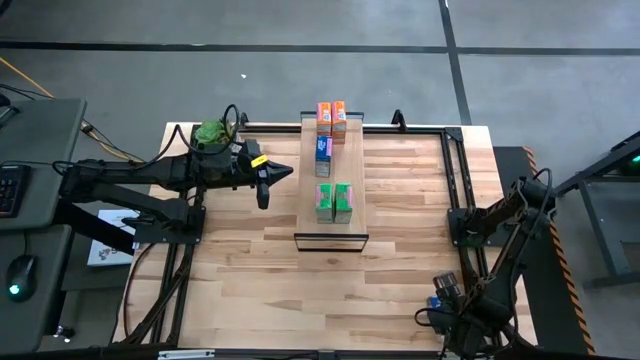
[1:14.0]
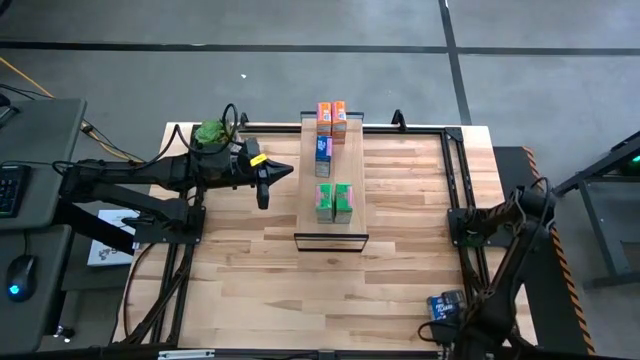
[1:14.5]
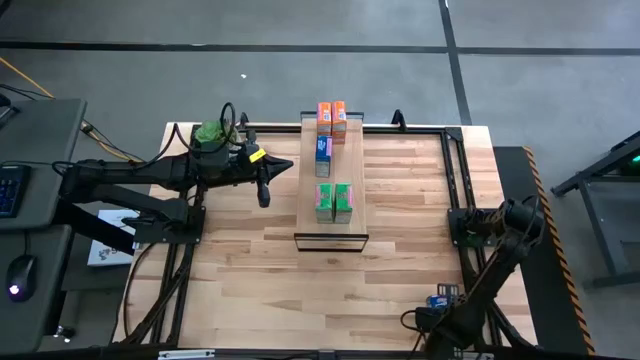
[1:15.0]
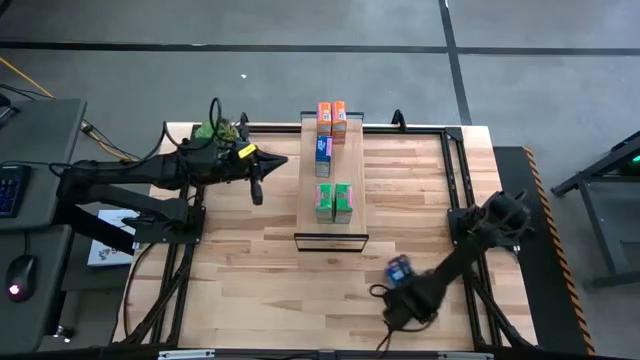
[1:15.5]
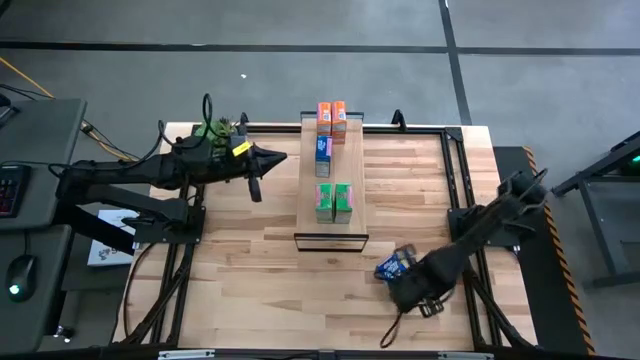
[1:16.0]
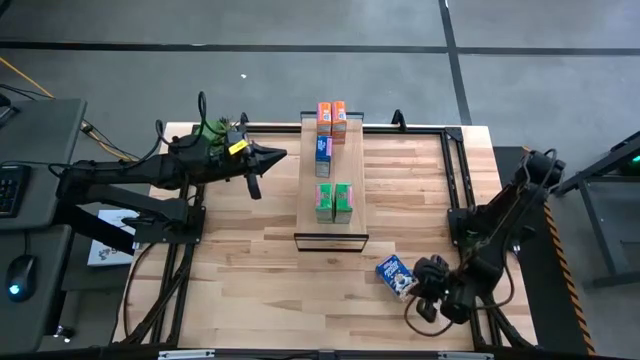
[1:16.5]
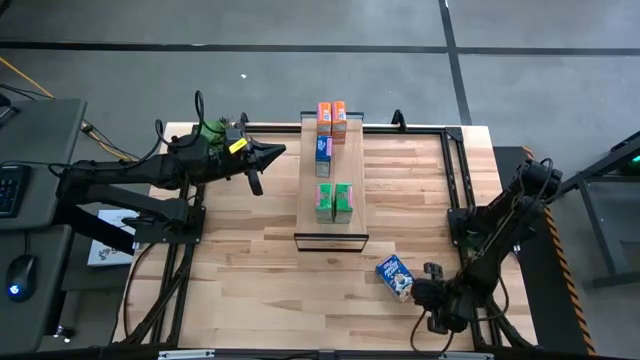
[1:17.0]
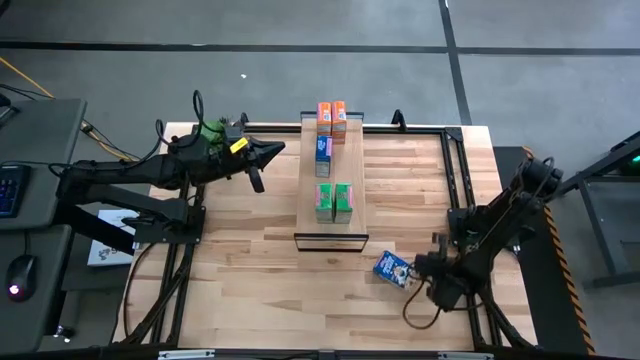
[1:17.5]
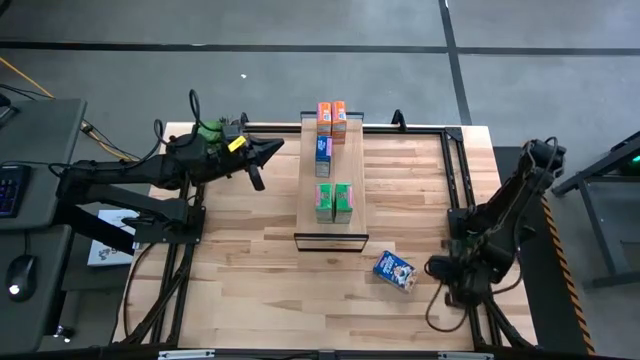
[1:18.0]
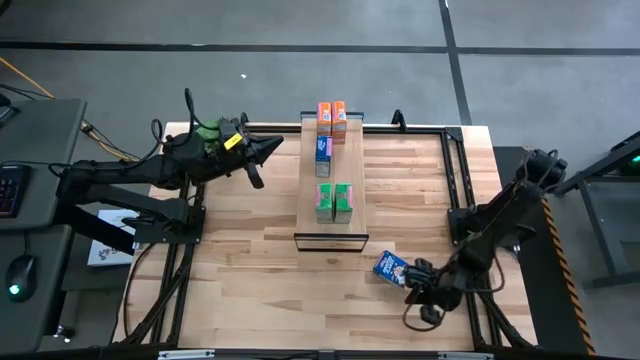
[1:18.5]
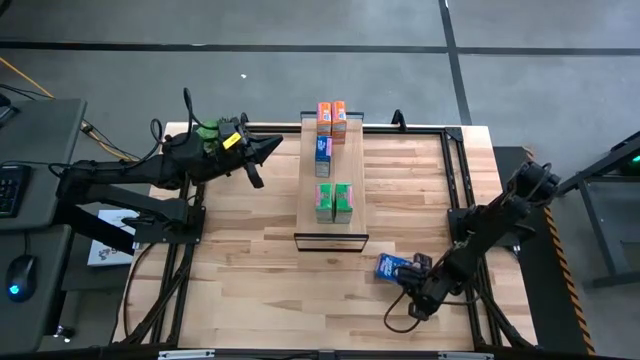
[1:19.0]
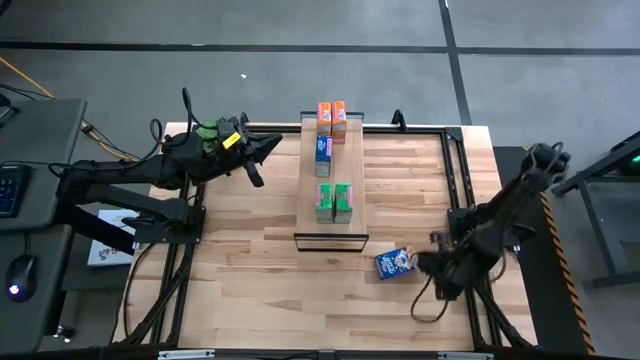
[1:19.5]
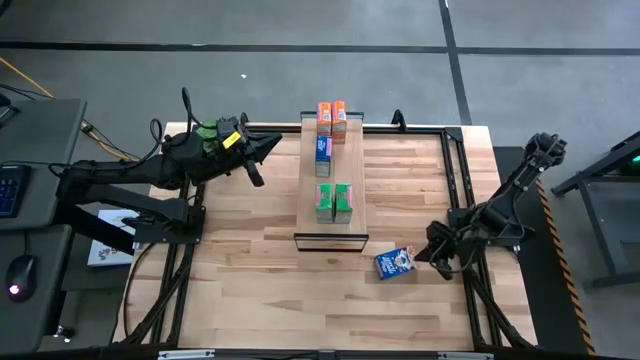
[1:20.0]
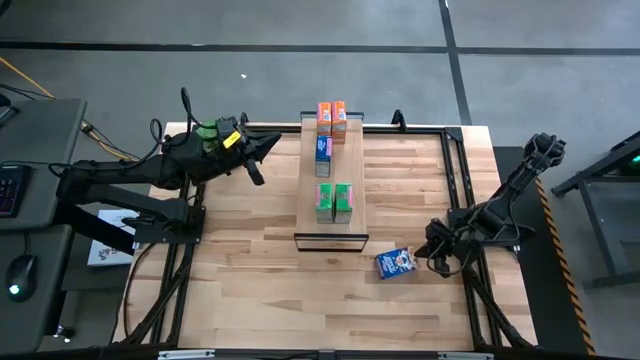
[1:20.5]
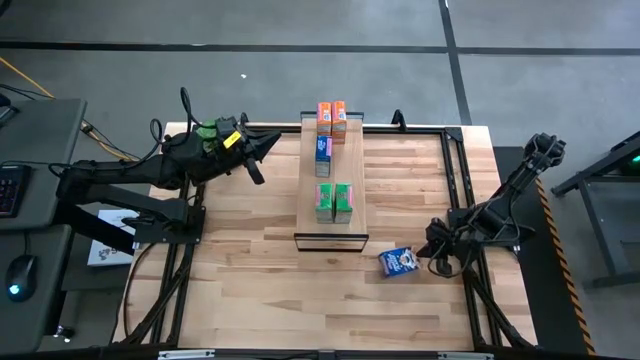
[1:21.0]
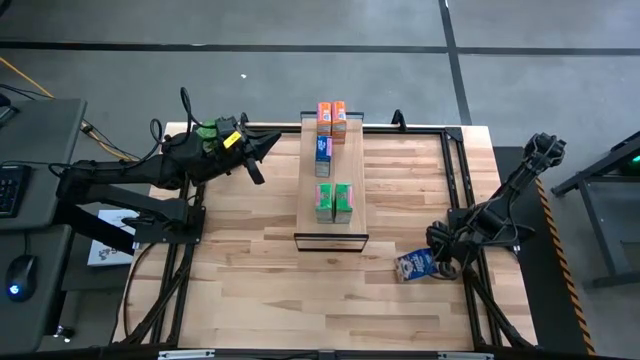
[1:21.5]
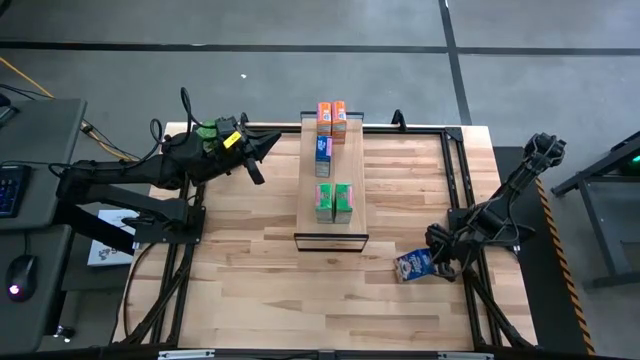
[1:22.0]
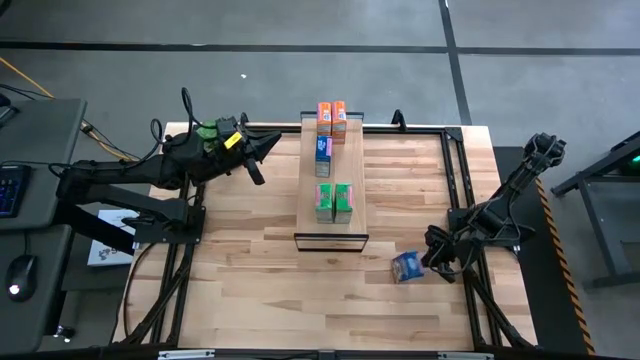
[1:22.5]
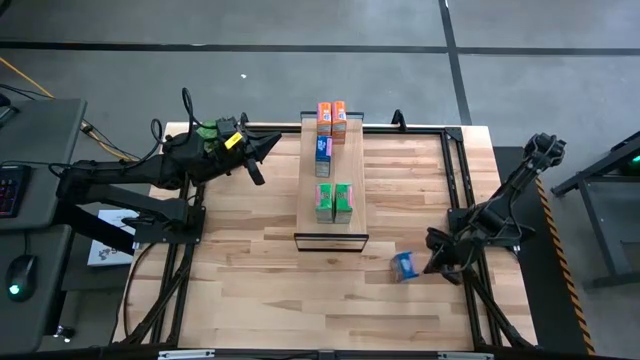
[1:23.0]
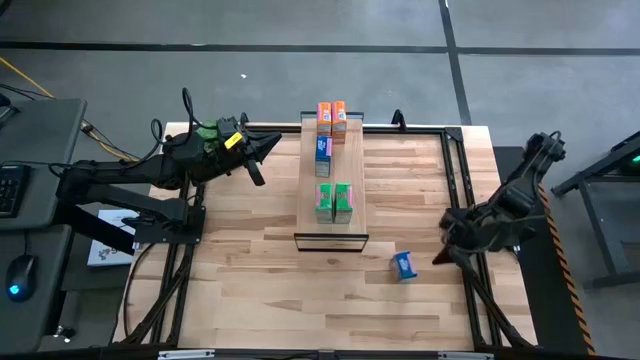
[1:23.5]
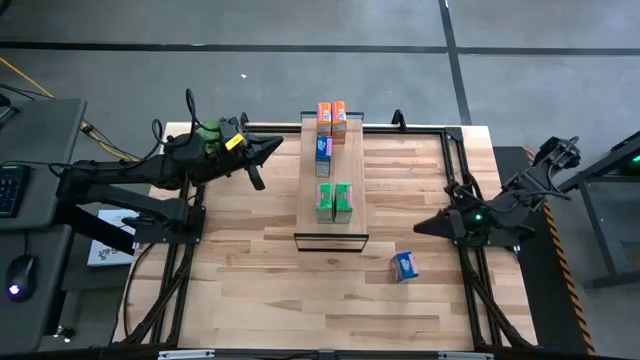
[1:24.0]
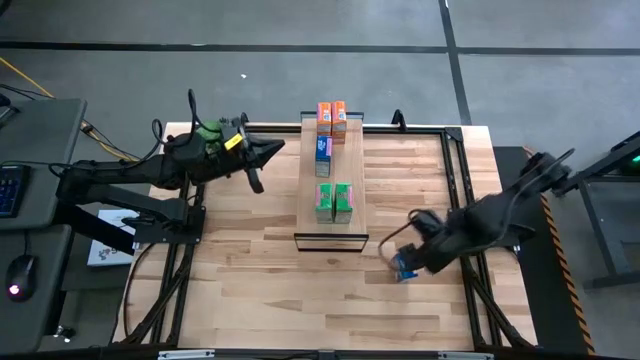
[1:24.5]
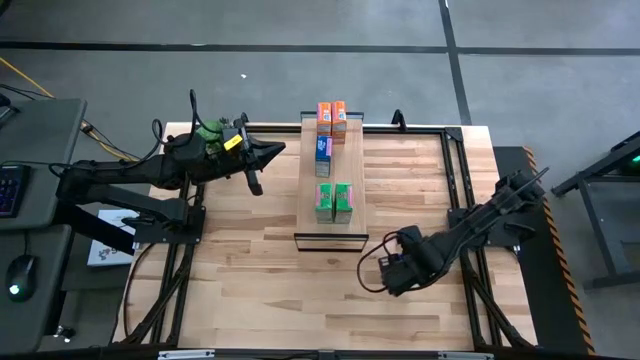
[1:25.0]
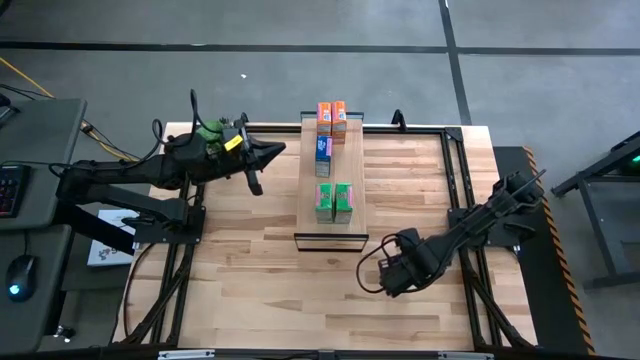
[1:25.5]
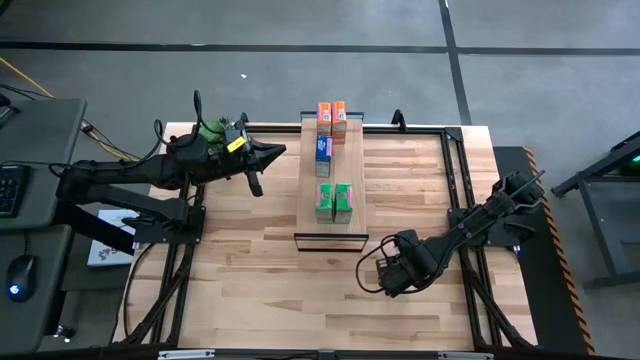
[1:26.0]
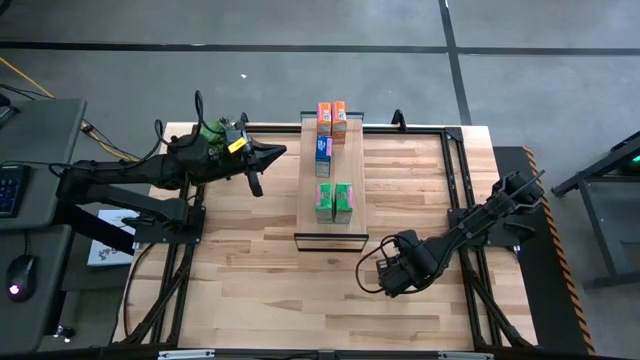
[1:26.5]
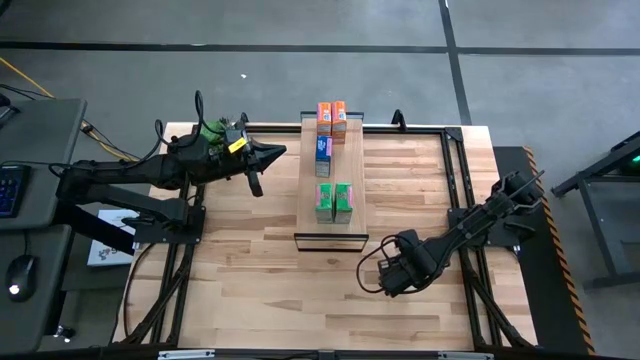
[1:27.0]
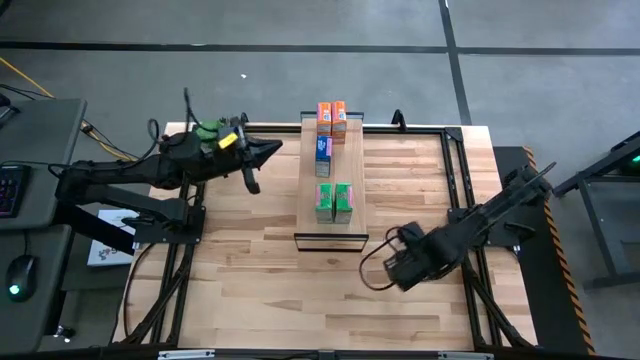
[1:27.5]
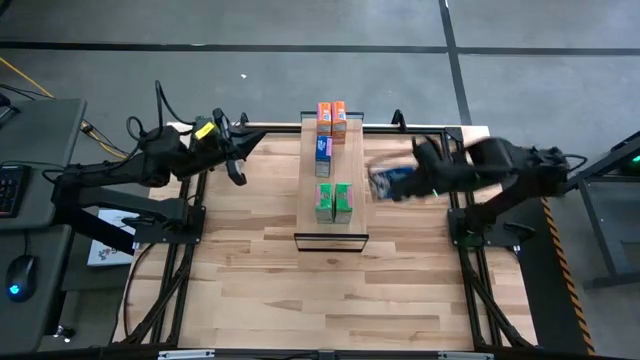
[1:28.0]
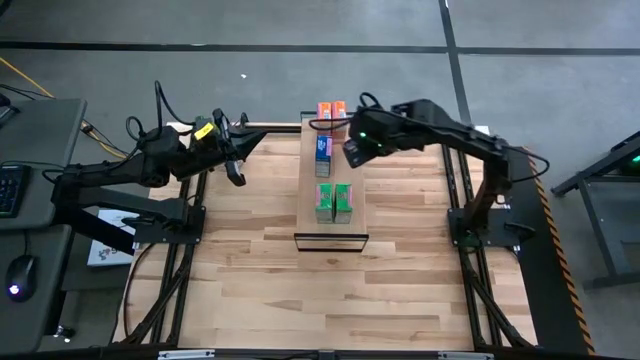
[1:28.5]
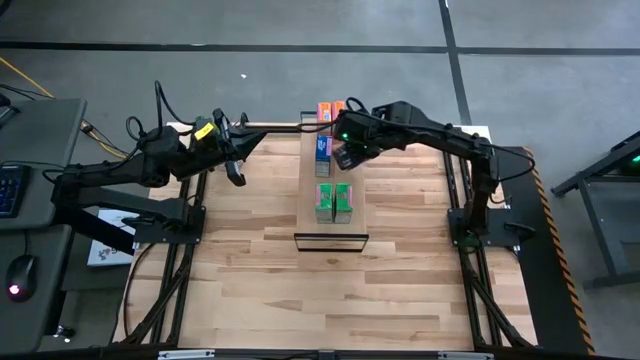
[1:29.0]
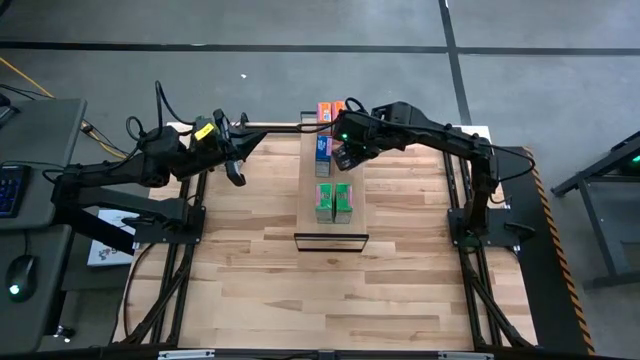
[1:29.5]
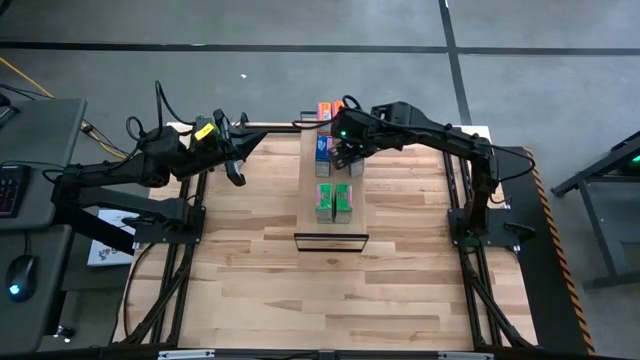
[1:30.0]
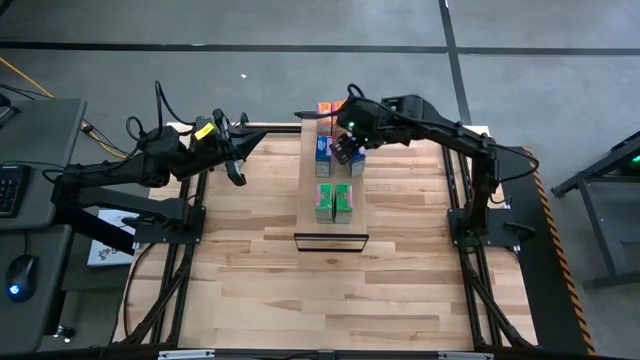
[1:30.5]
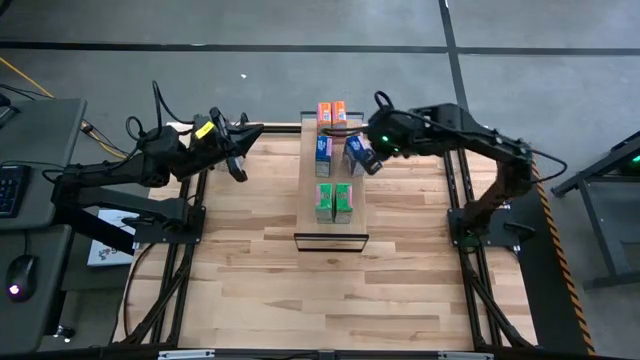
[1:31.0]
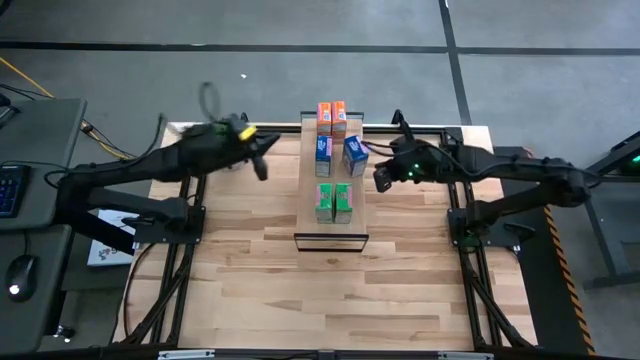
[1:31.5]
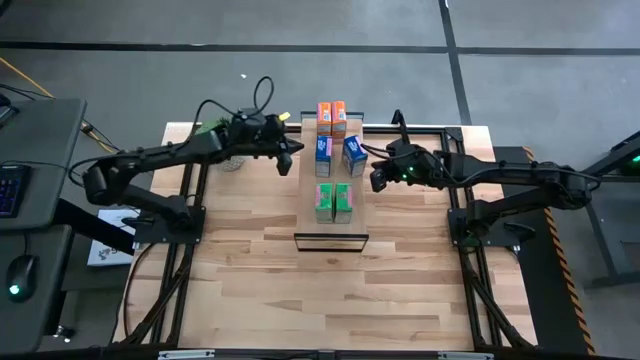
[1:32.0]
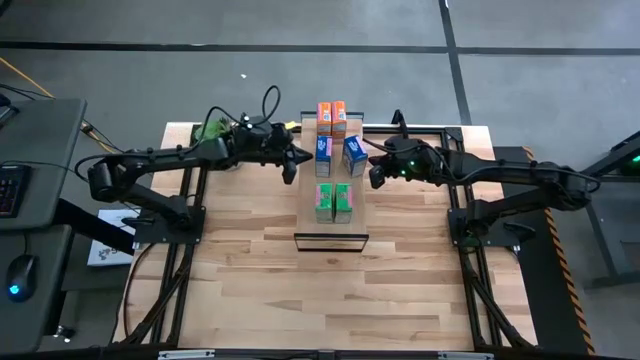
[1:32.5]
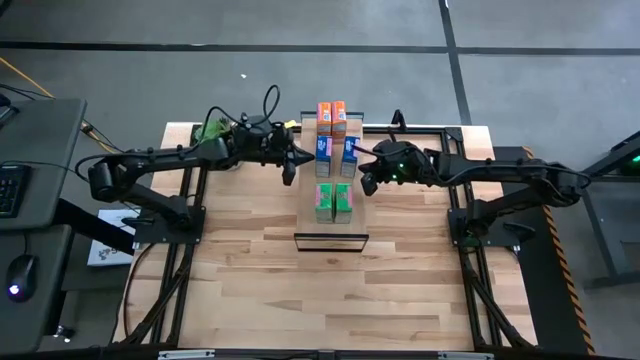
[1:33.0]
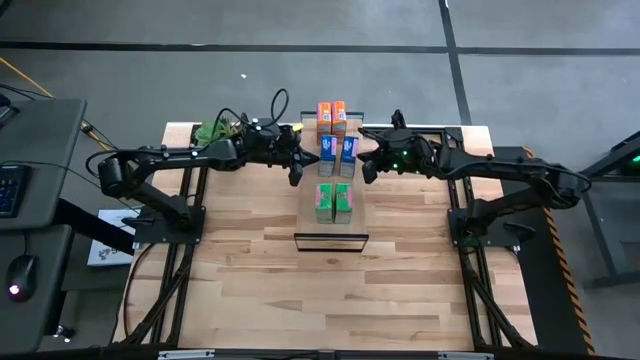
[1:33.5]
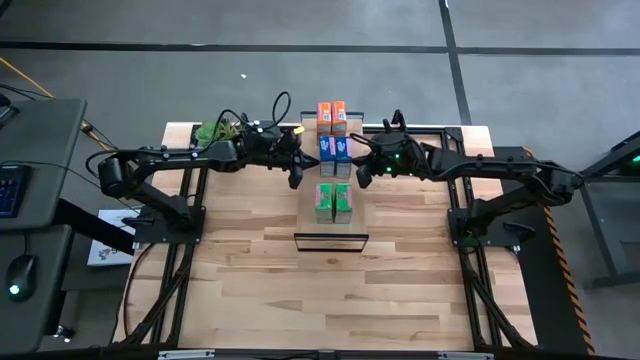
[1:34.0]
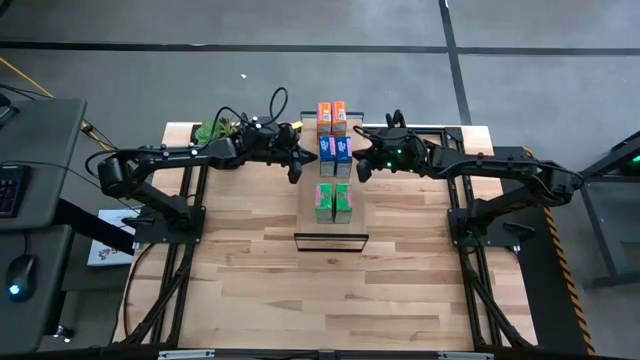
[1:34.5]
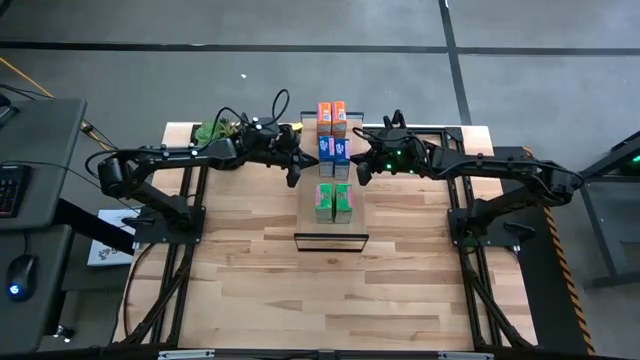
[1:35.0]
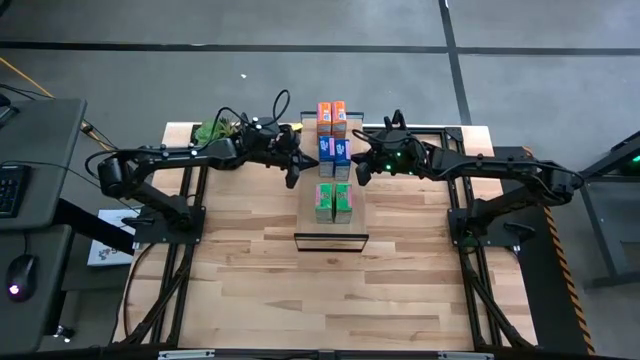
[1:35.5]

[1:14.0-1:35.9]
Task: Stack cereal on shelf
Put the blue cereal box on the shelf aligned with the other blue cereal box
